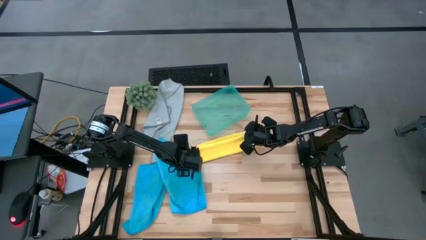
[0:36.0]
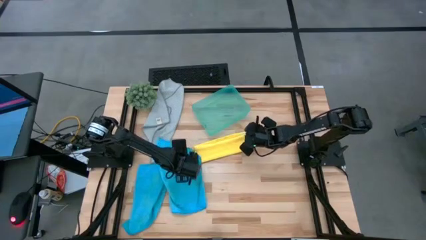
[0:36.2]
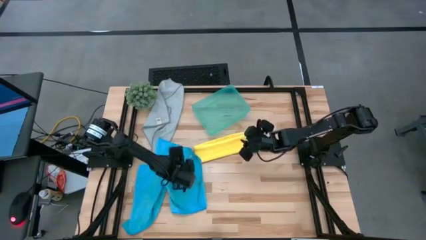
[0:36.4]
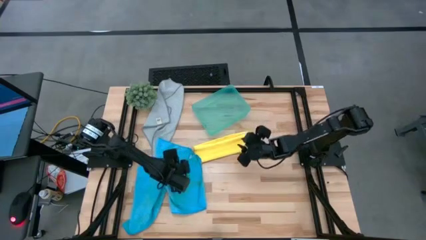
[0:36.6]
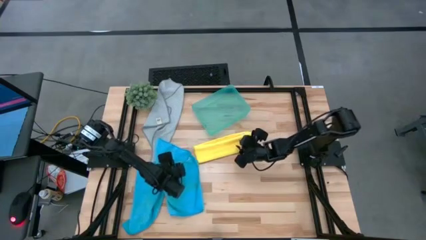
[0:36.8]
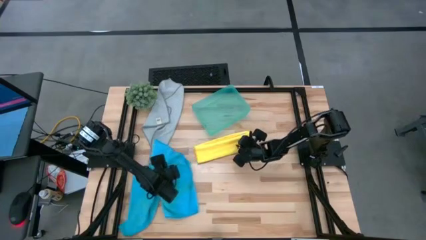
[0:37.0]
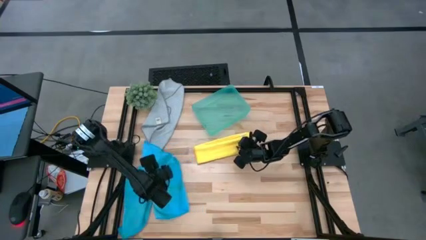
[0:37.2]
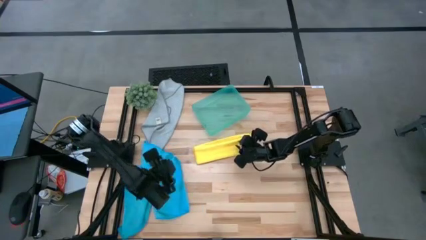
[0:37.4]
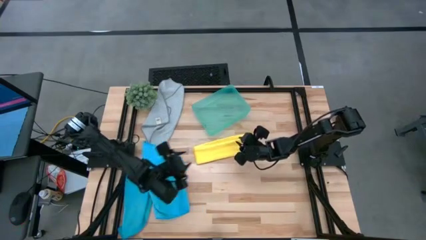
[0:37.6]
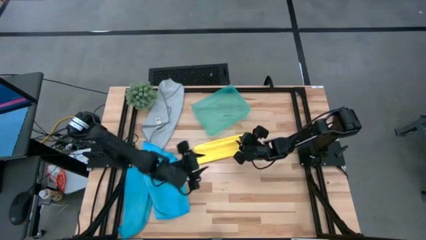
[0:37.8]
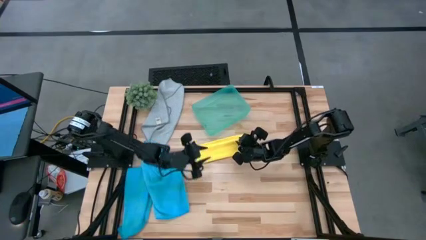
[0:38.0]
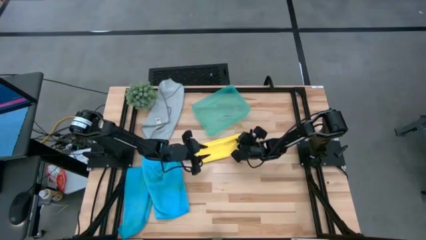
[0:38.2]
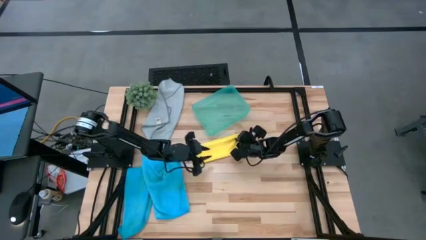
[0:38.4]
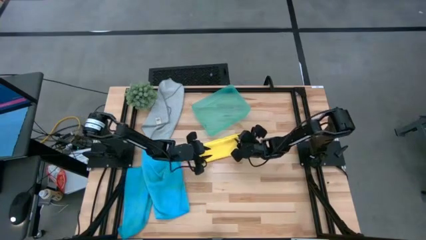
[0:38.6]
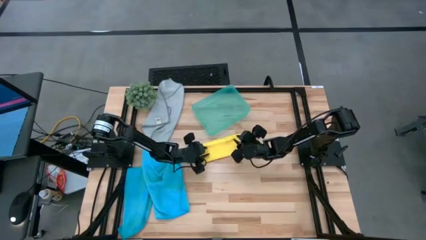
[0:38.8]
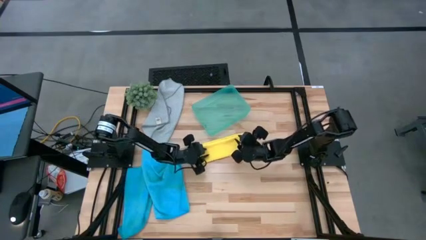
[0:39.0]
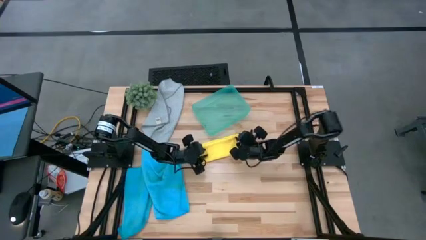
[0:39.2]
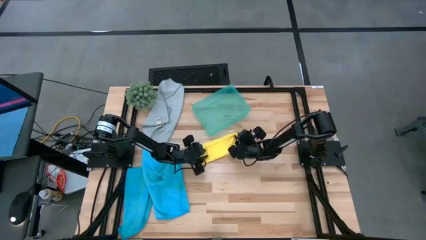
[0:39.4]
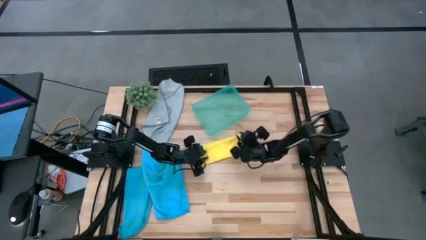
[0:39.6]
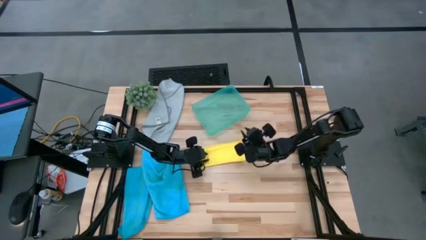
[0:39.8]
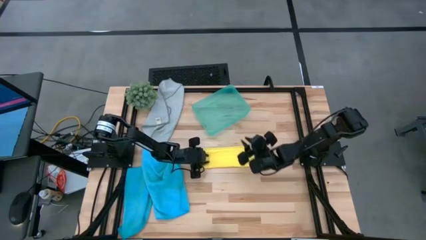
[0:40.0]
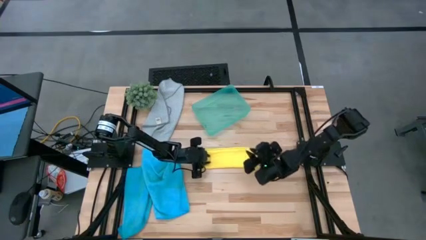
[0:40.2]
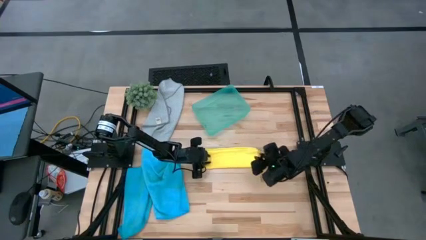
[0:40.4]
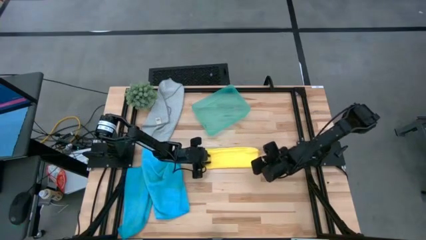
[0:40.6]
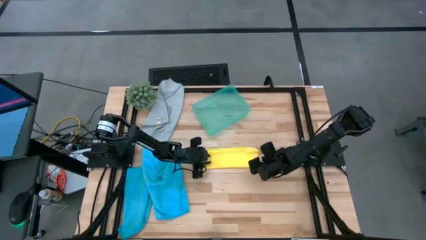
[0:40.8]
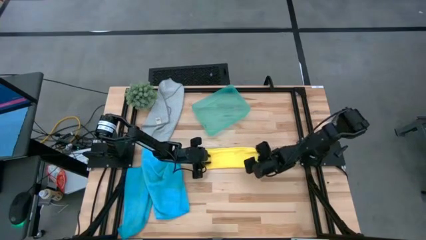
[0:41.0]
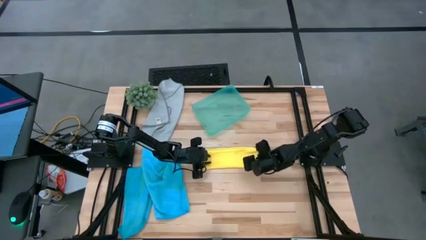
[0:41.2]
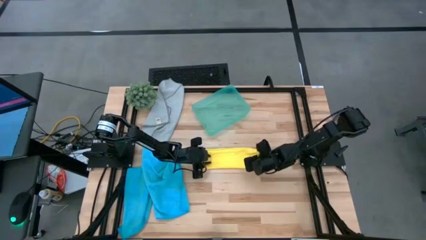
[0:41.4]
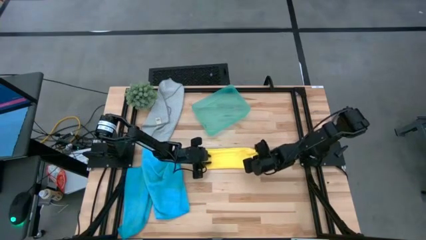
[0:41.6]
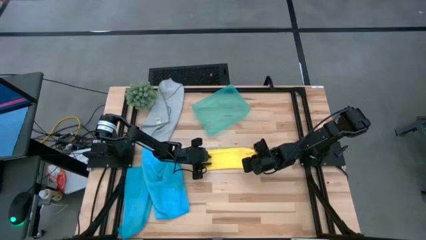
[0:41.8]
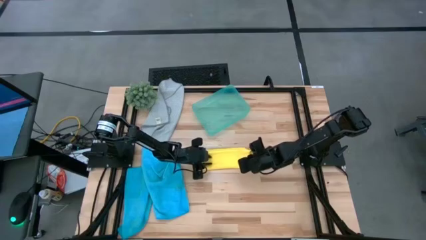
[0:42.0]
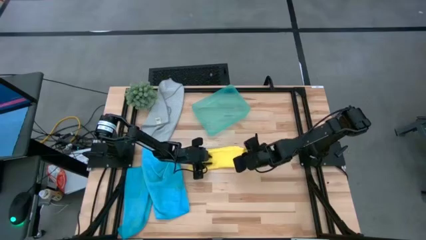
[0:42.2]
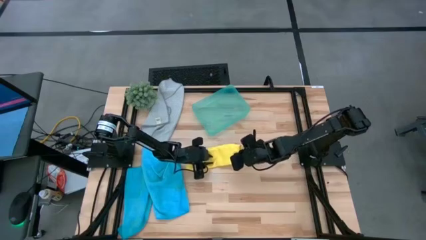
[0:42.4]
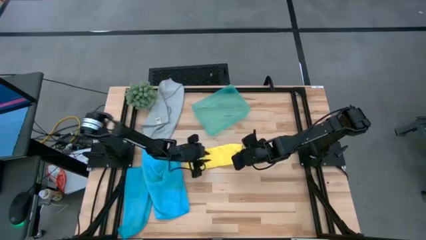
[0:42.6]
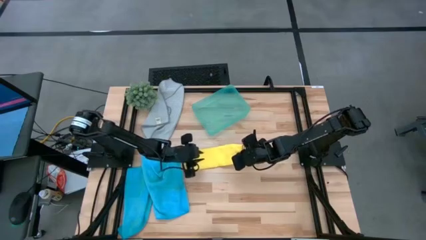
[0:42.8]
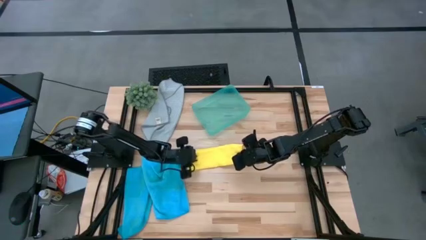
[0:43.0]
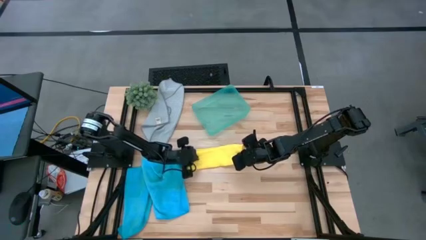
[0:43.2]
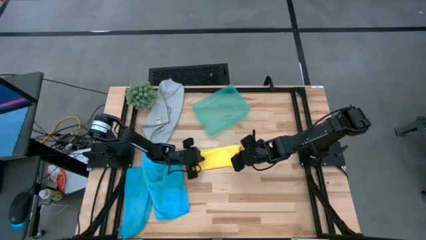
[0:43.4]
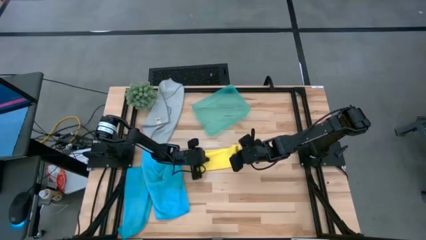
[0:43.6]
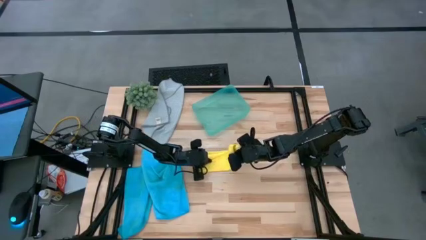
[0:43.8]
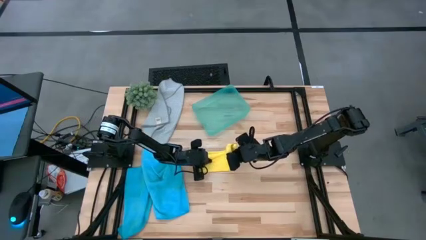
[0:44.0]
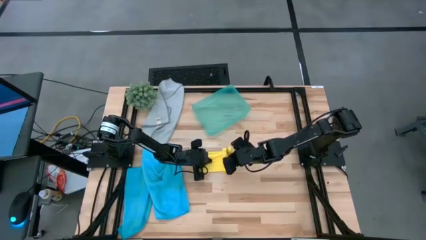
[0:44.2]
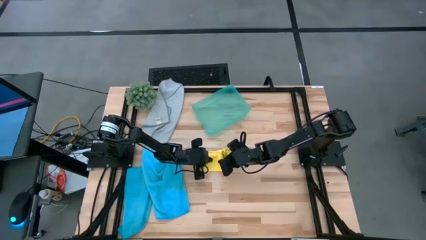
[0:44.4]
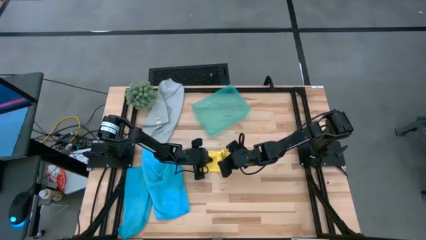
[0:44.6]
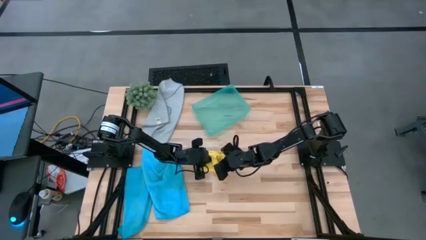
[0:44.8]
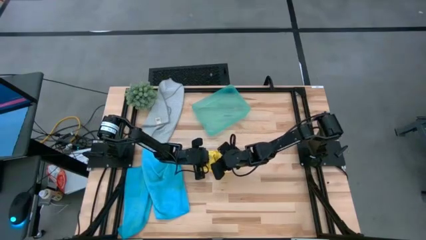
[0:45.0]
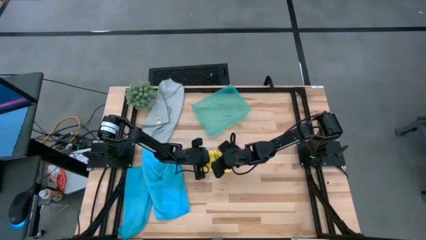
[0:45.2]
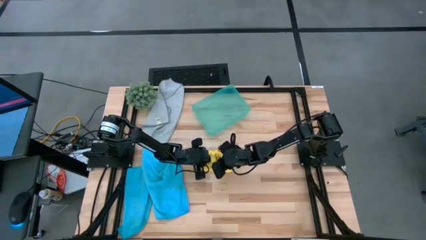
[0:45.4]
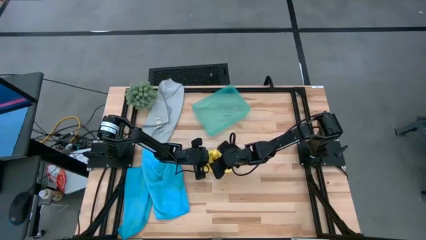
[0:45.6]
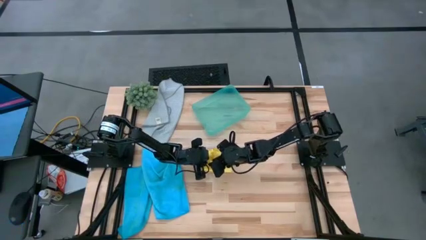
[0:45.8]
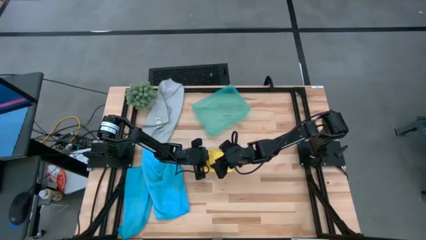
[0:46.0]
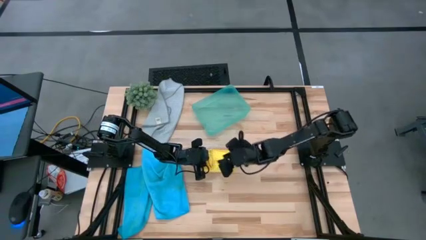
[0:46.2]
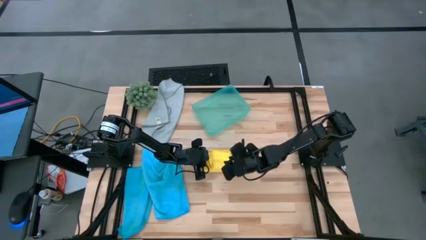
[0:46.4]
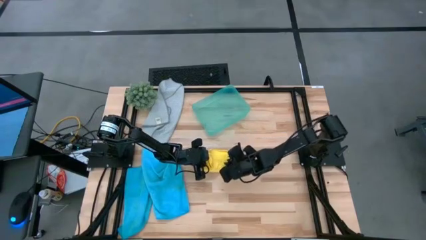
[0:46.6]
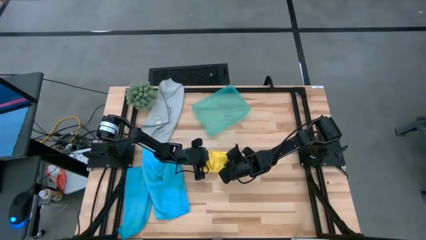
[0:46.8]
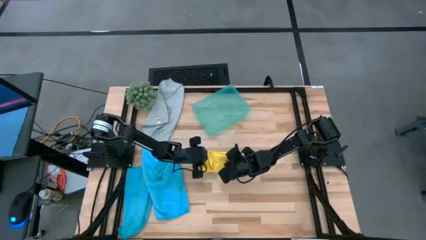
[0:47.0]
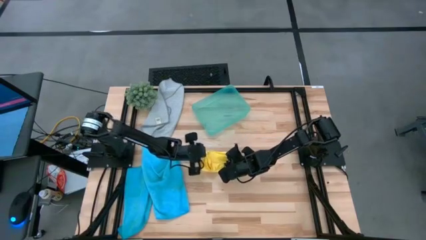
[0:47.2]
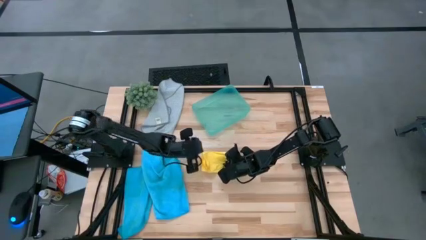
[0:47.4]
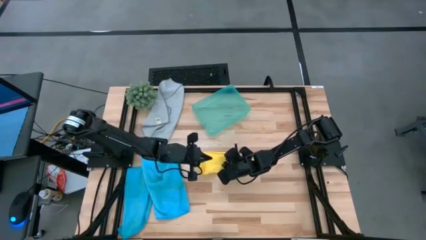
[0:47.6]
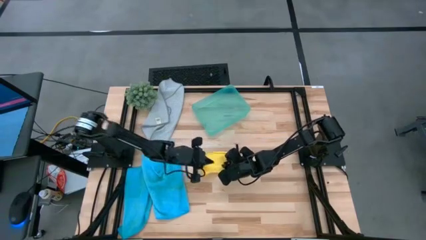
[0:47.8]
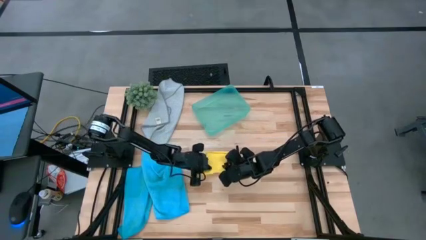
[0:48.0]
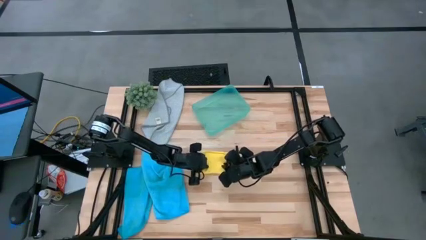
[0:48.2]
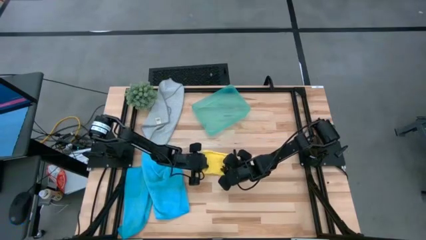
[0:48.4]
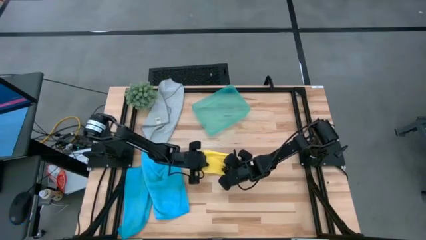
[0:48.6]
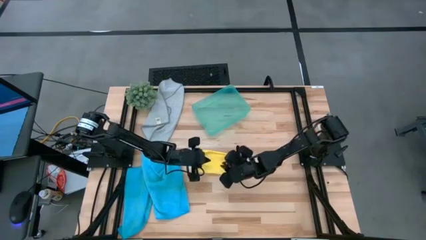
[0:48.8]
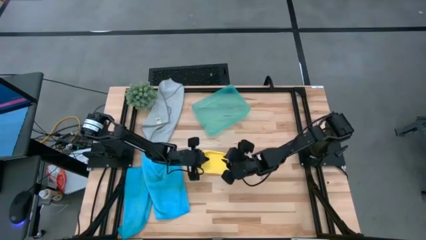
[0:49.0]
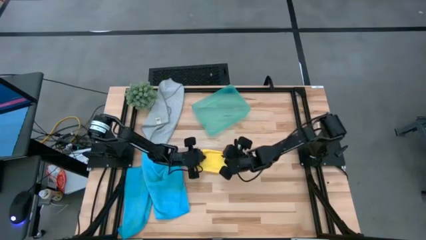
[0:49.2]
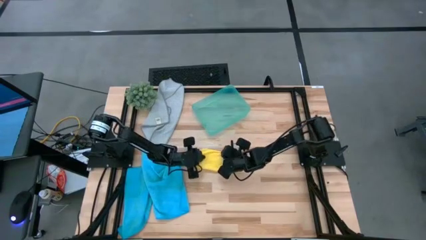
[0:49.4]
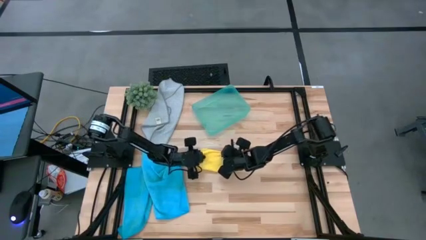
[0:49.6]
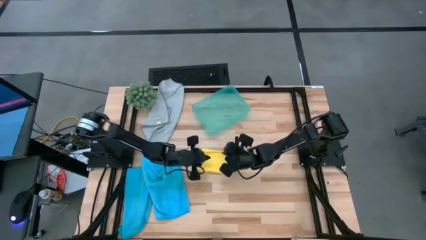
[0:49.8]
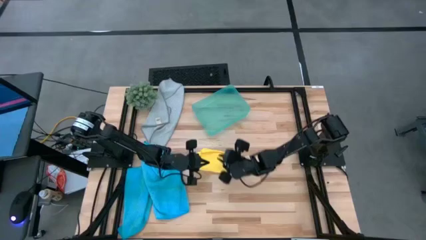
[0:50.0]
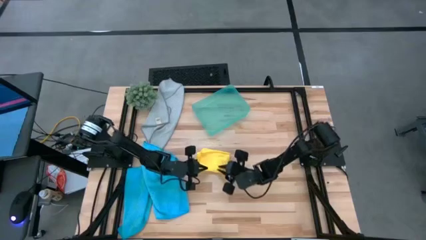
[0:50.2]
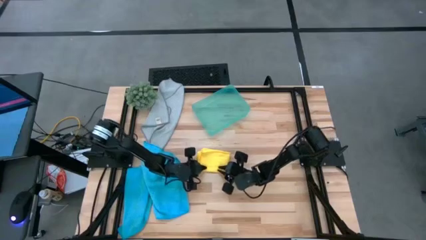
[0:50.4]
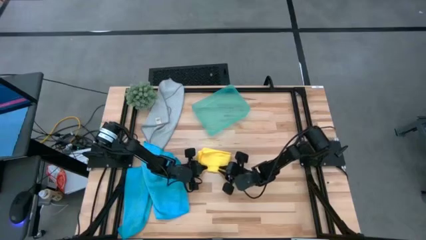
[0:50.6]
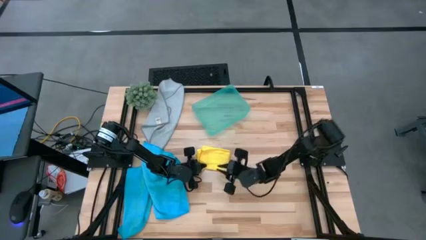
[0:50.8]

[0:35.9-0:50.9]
Task: Fold microfiber towels
Fold the yellow microfiber towel

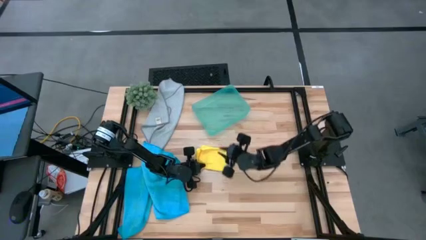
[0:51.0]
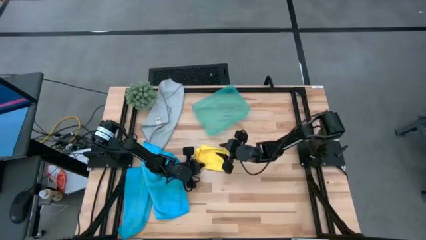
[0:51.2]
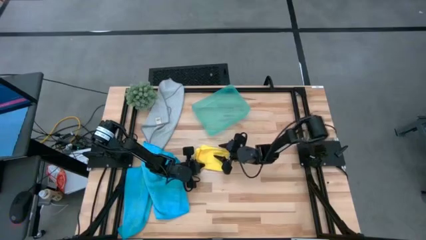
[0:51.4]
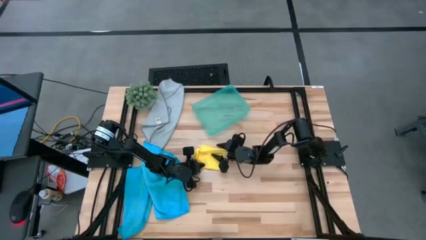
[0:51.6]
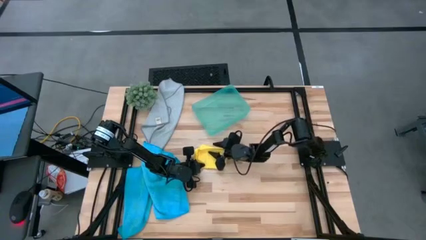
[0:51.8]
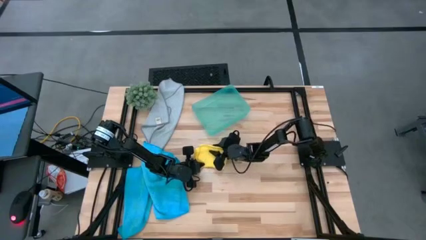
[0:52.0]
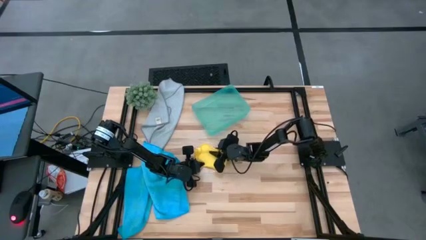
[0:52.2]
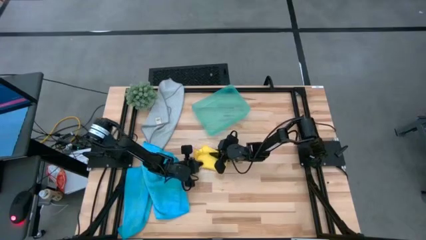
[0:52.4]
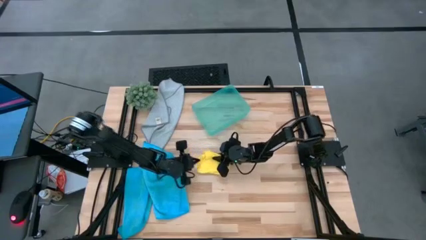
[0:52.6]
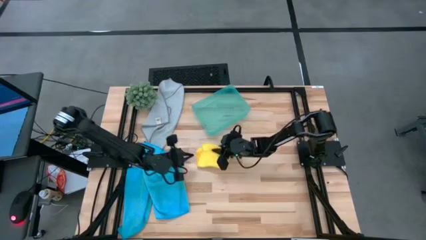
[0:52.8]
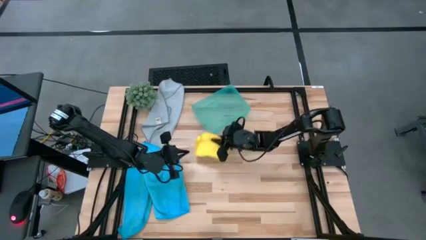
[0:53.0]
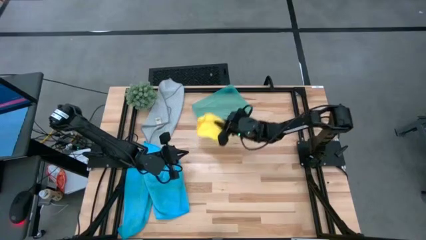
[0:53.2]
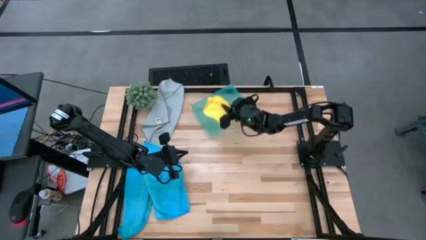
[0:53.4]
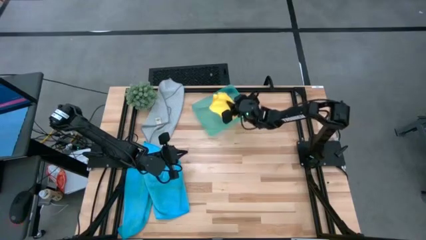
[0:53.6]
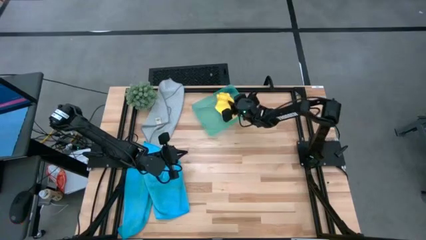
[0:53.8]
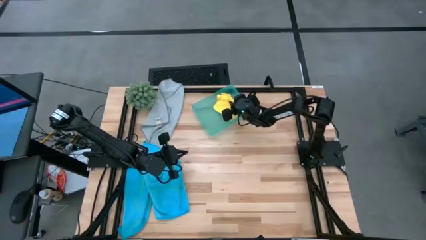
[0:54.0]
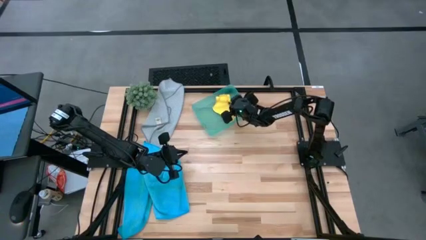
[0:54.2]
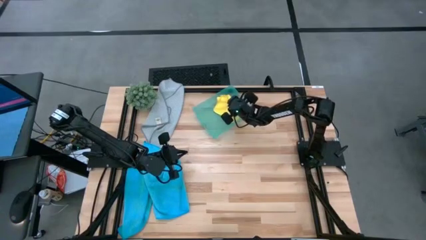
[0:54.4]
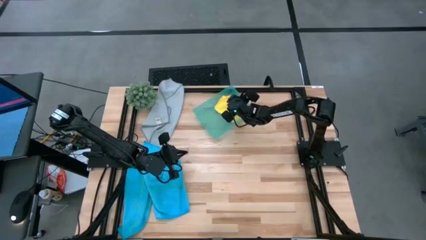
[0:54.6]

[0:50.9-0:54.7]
Put the folded yellow microfiber towel into the green bin
